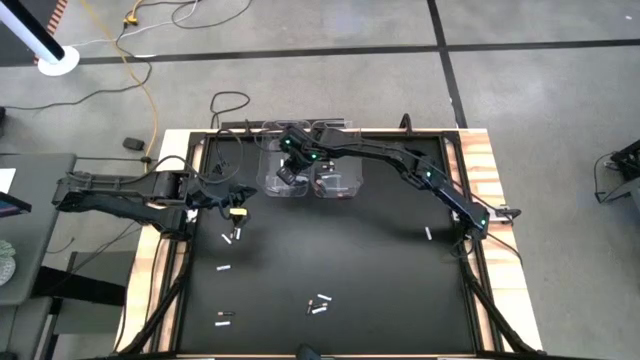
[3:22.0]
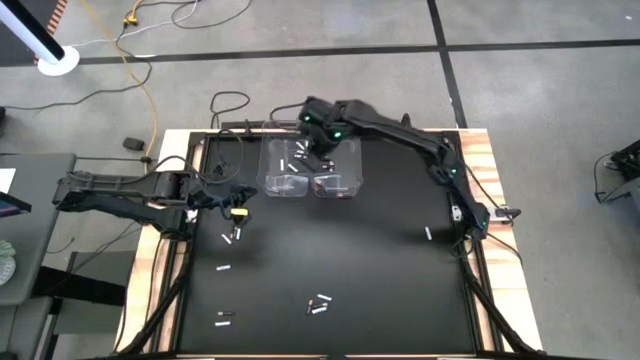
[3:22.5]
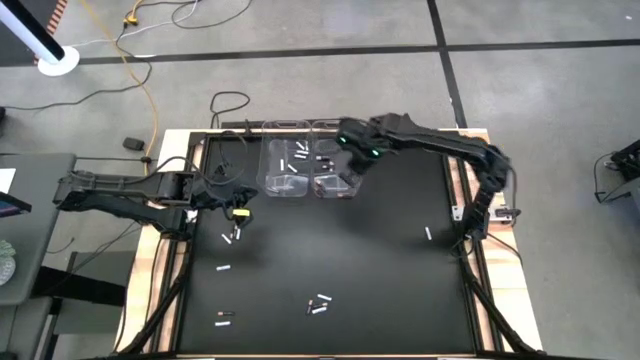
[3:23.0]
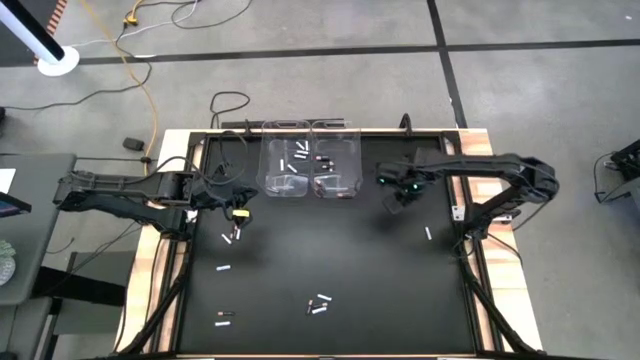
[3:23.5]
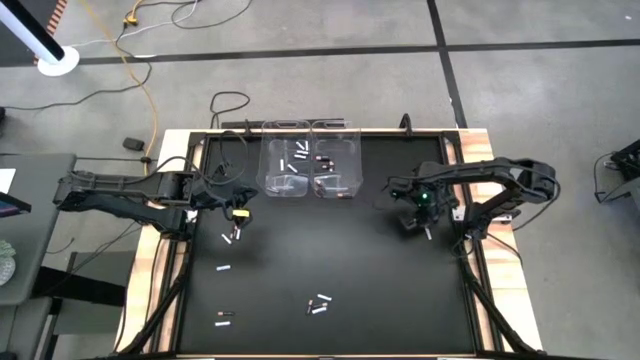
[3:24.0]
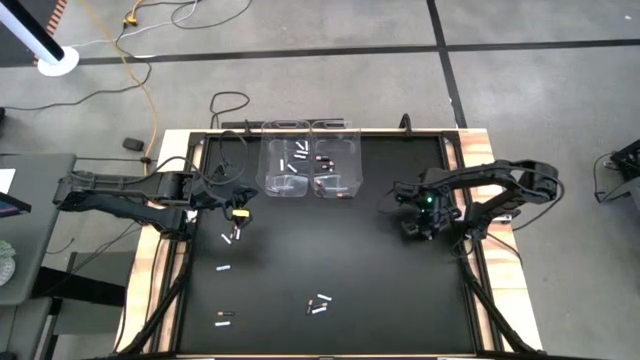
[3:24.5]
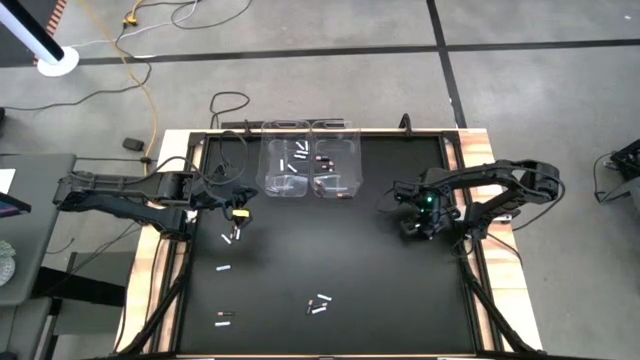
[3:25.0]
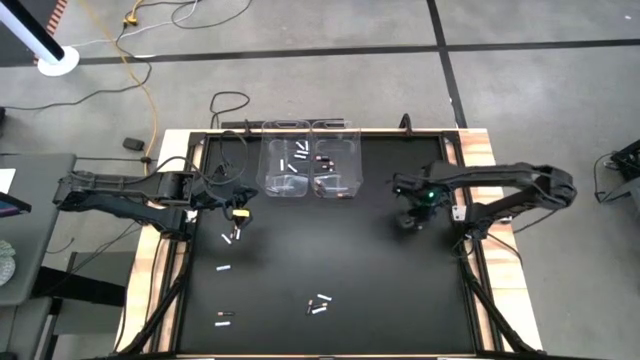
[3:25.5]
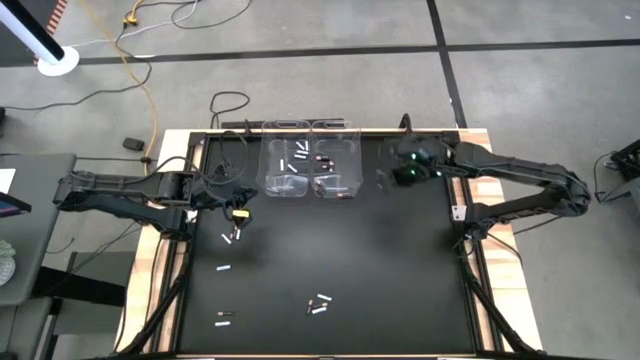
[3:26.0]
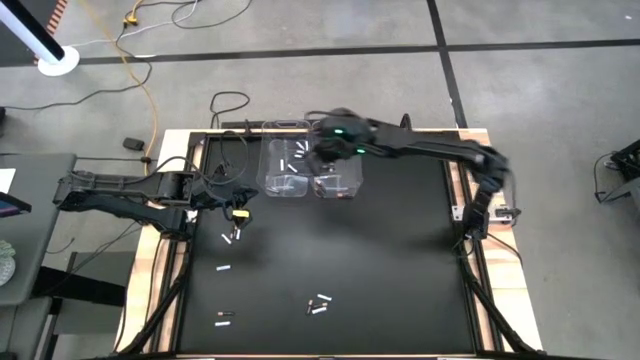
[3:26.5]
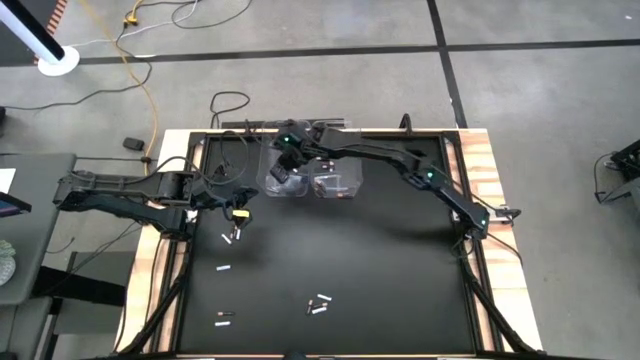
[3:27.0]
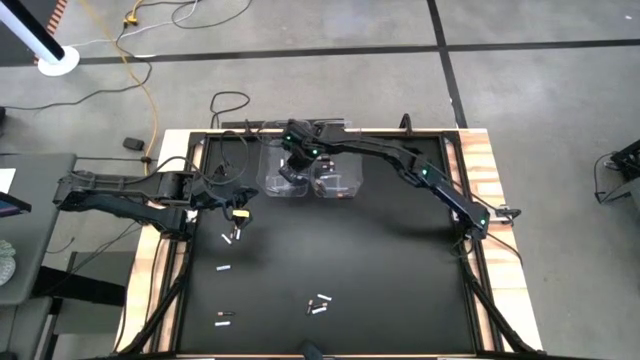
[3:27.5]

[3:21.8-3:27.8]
Task: Sort batteries
Put the white battery into the left transparent bin

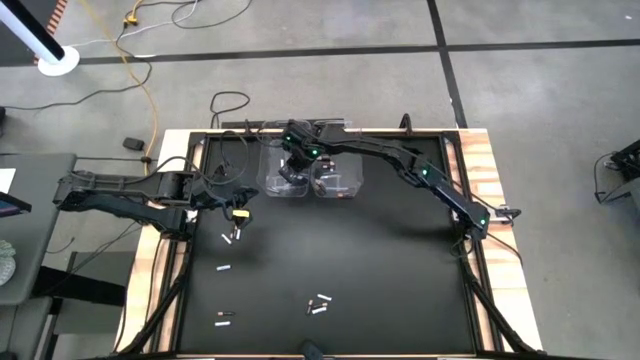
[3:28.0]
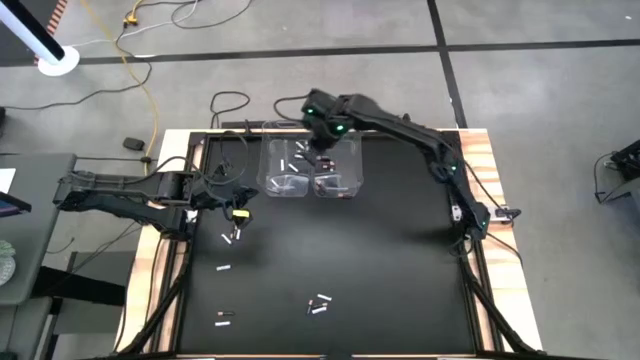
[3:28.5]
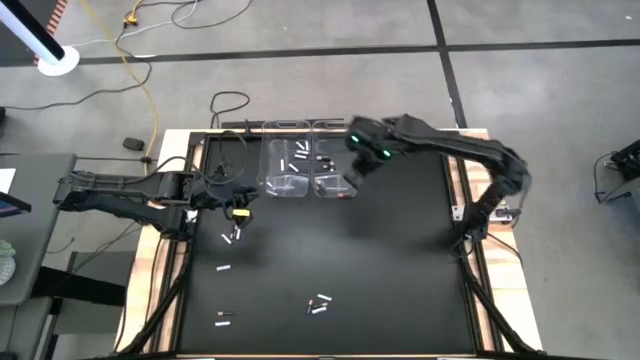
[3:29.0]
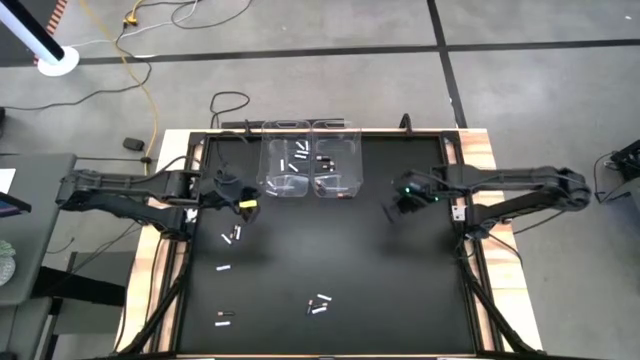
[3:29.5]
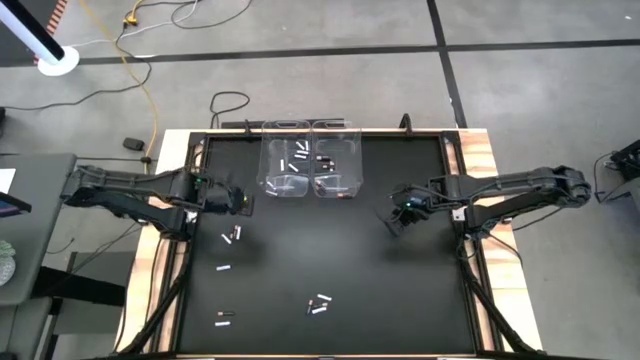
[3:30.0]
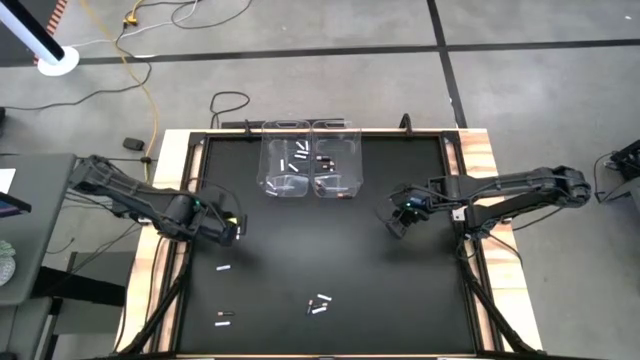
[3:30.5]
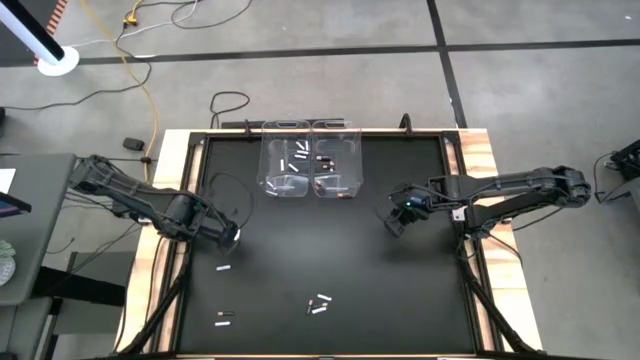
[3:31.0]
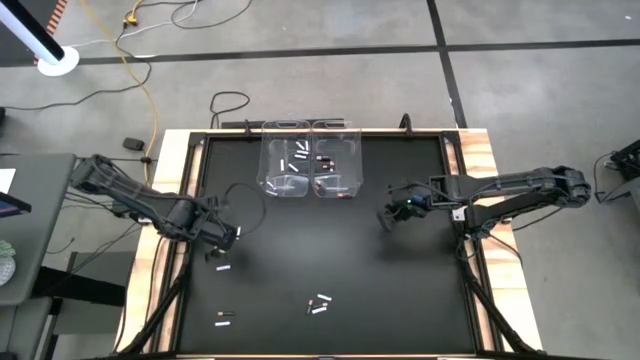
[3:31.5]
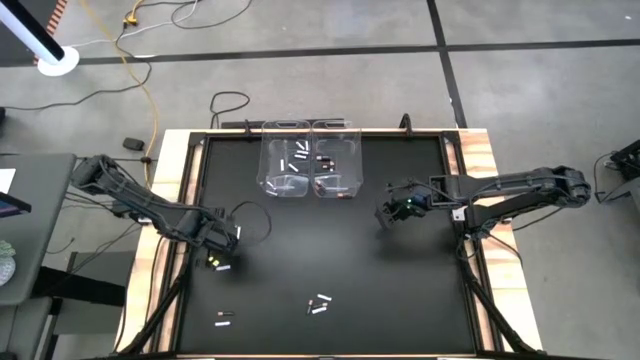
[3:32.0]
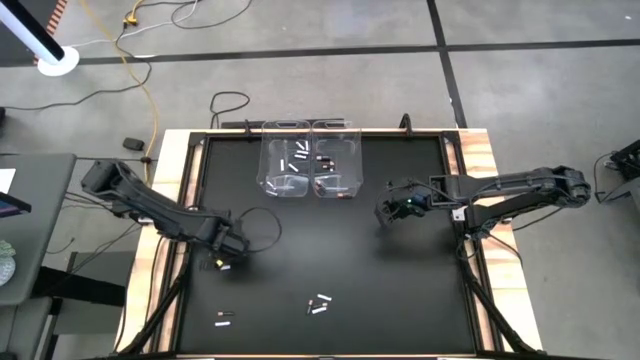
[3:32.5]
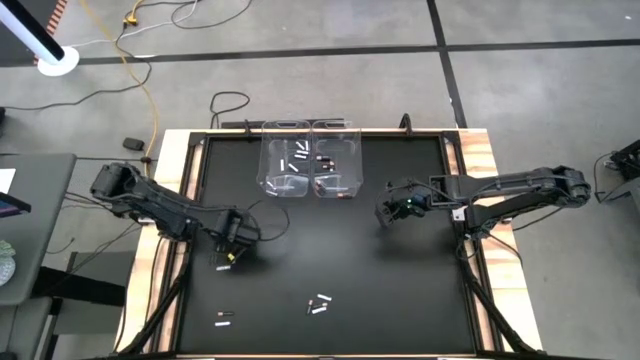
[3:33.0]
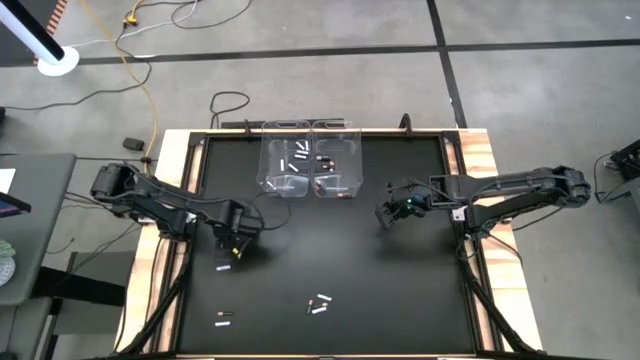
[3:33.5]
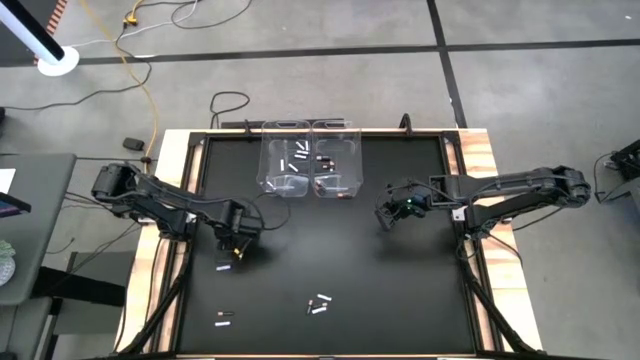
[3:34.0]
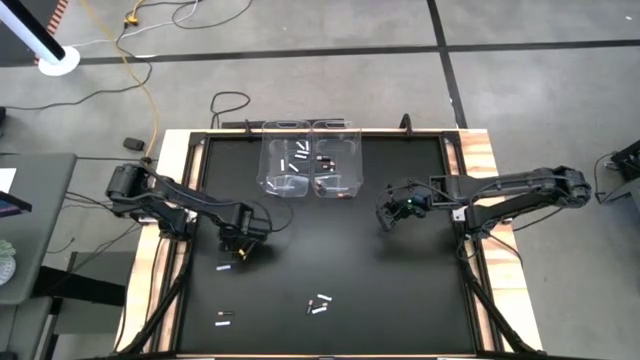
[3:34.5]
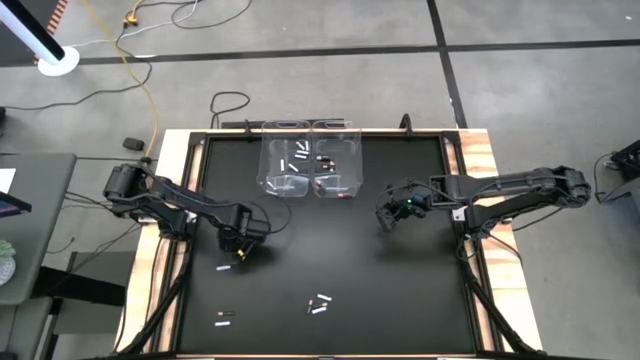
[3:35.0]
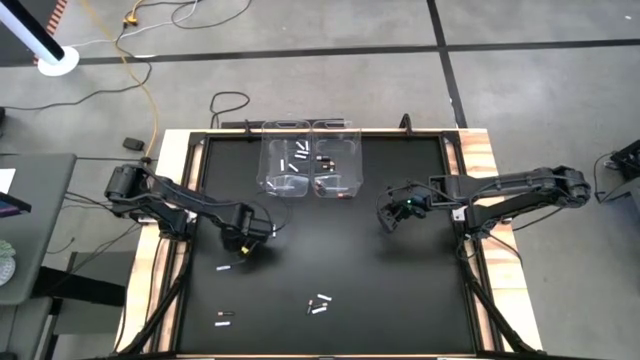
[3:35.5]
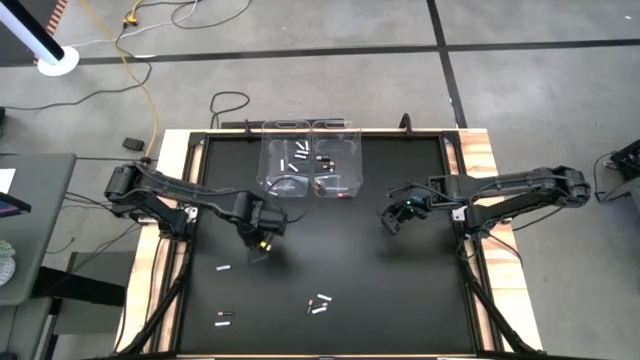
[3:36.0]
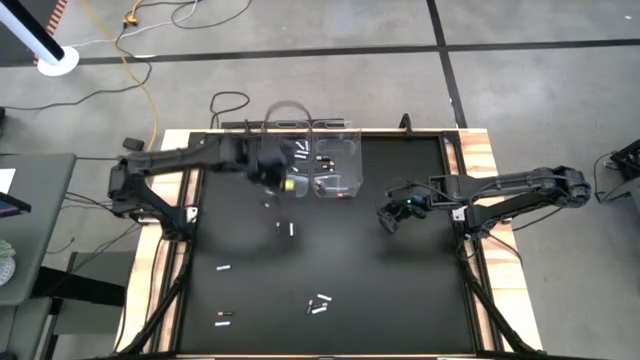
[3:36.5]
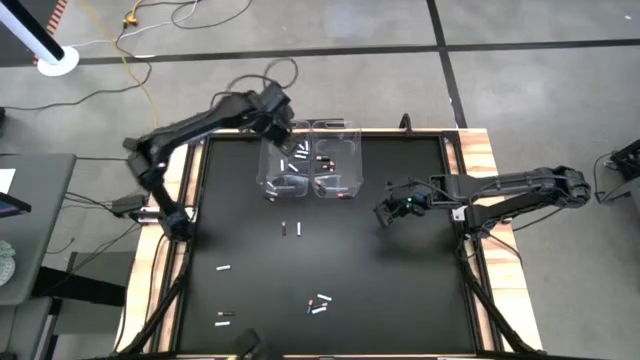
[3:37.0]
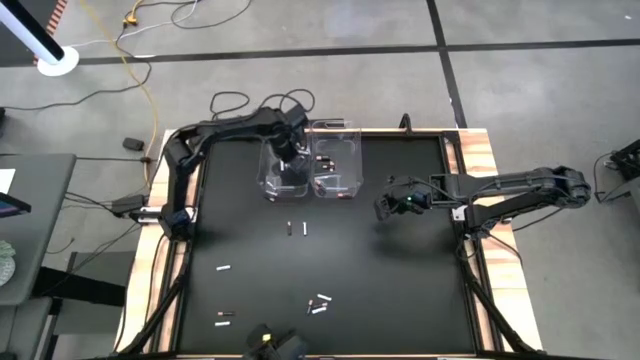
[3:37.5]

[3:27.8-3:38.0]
Put the white battery into the left transparent bin

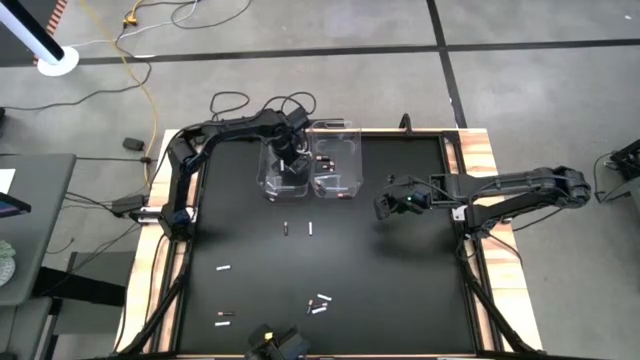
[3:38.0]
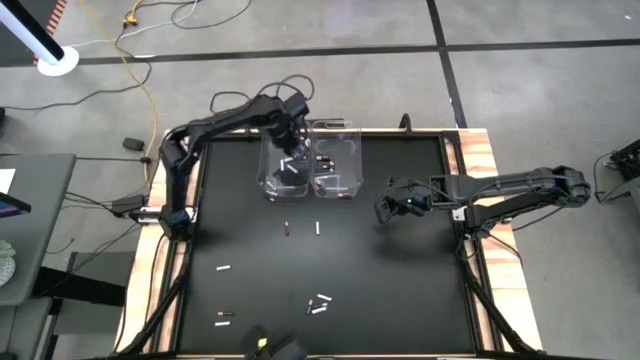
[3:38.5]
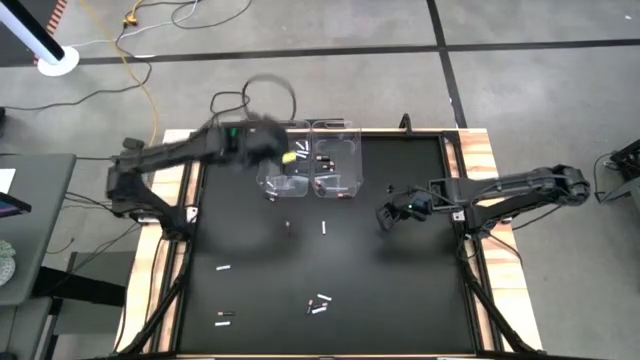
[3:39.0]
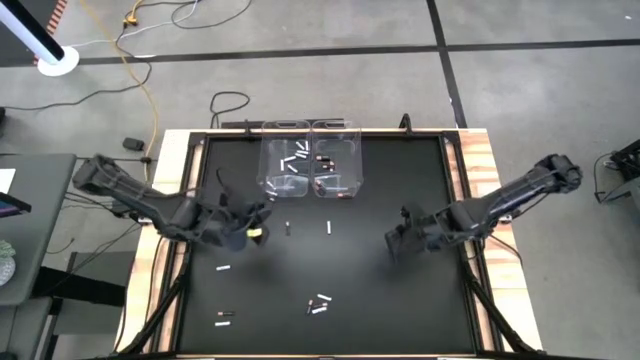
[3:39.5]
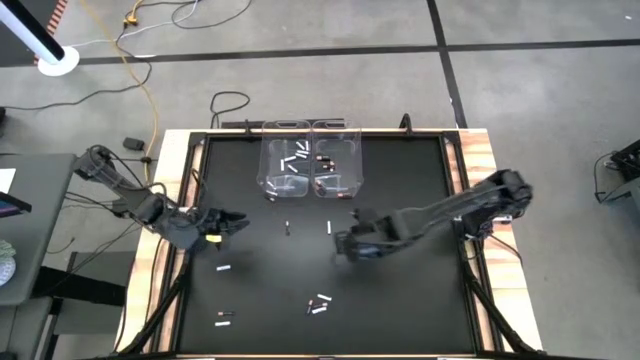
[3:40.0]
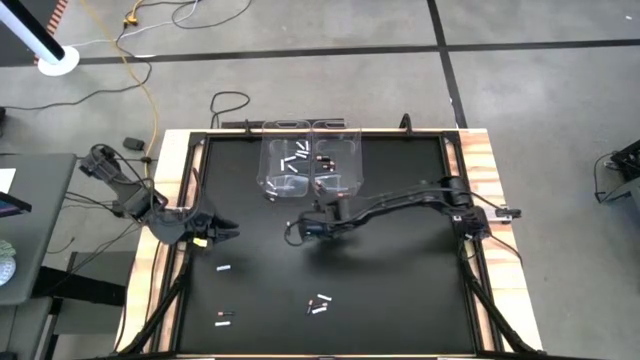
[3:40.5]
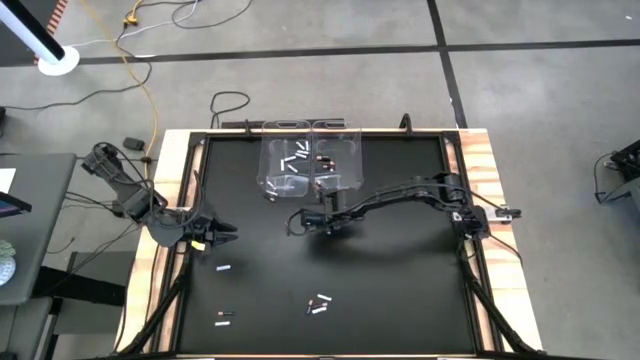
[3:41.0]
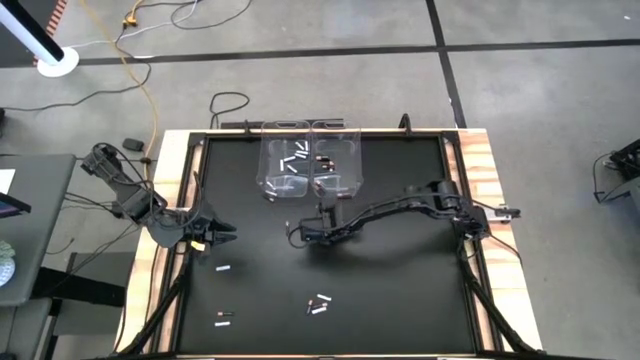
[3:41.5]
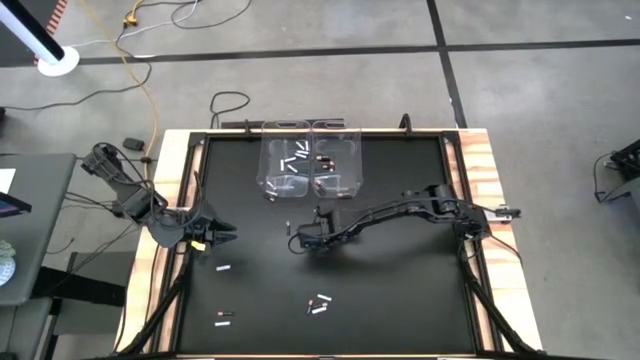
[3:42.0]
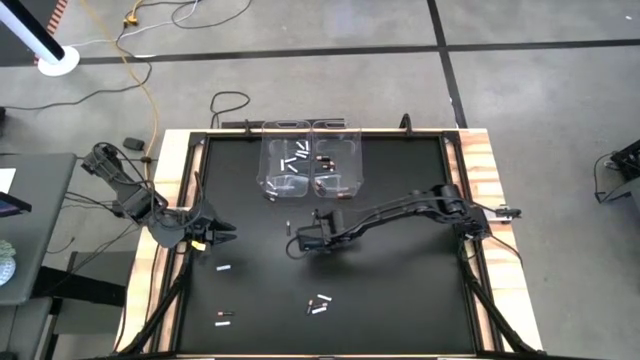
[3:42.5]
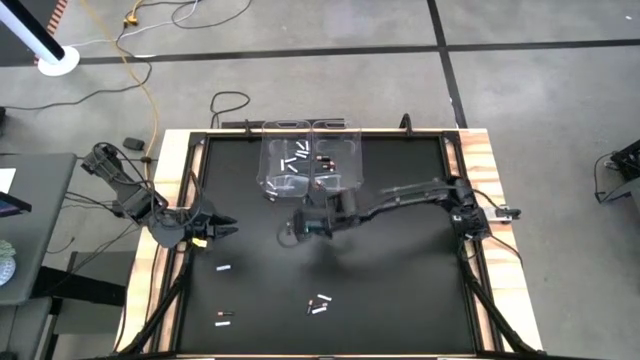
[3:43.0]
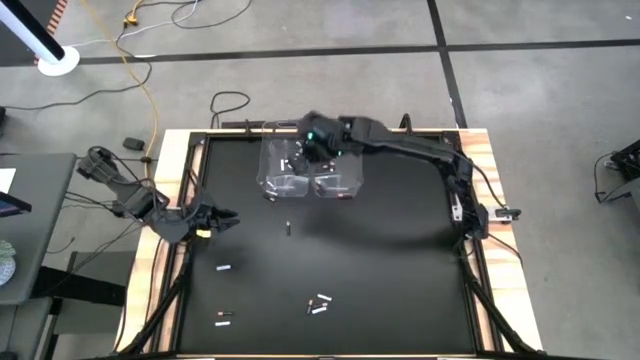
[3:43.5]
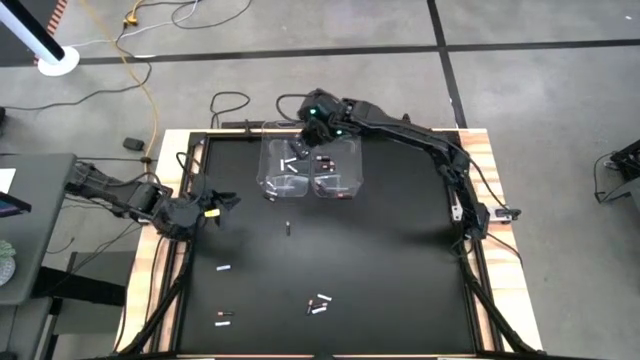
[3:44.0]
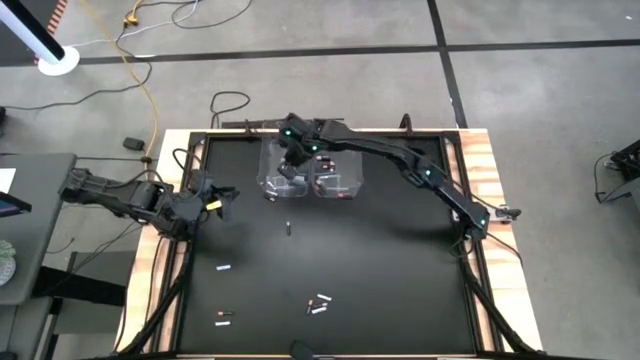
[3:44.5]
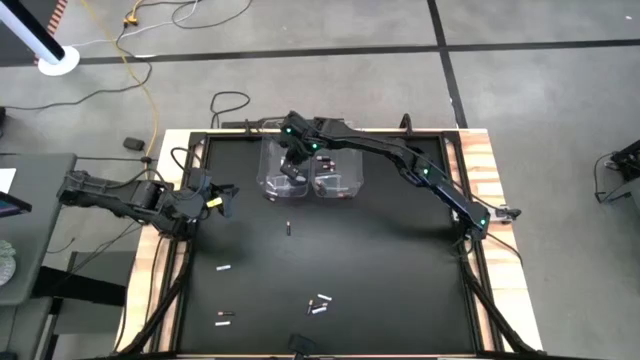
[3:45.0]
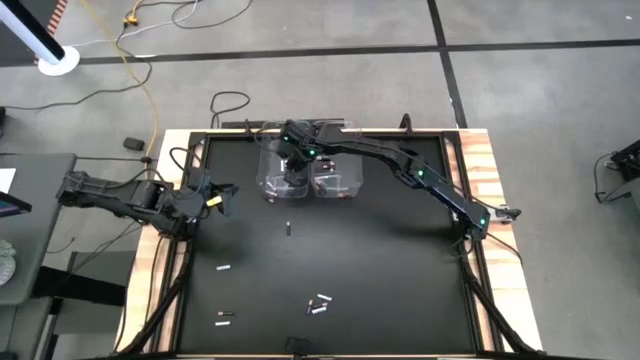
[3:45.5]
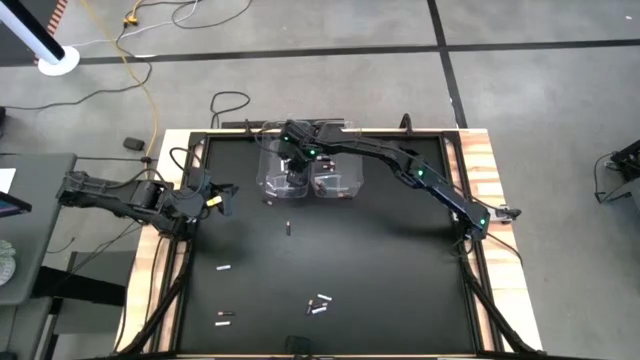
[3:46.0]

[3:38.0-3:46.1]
Put the white battery into the left transparent bin
